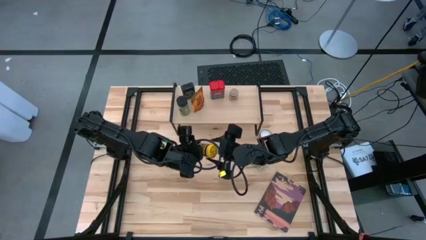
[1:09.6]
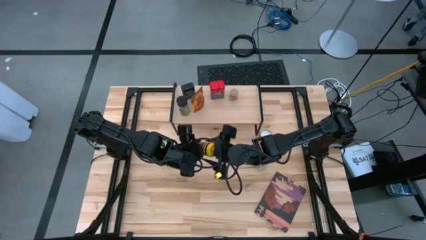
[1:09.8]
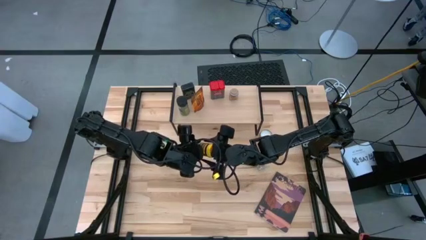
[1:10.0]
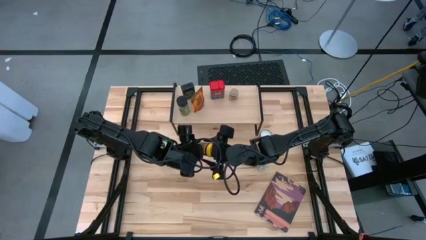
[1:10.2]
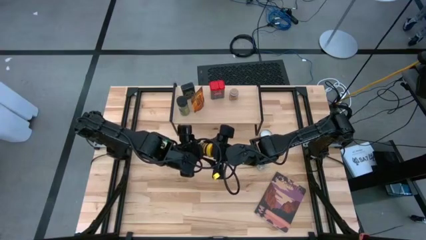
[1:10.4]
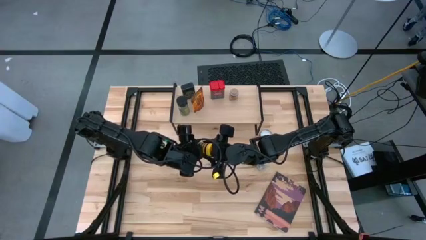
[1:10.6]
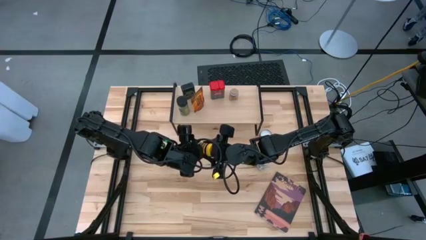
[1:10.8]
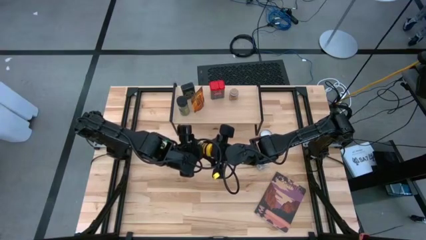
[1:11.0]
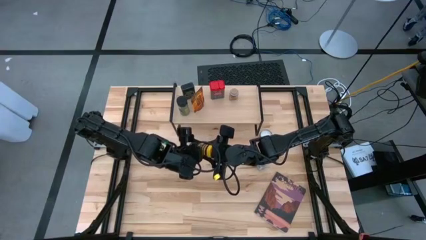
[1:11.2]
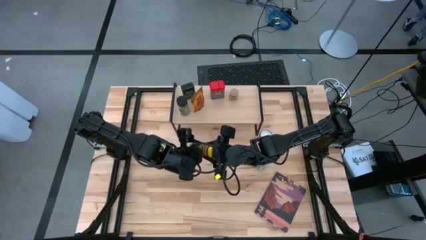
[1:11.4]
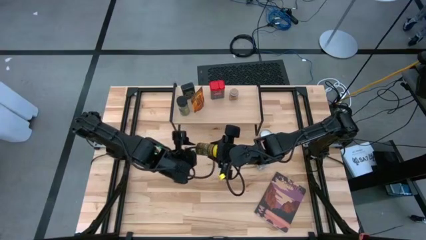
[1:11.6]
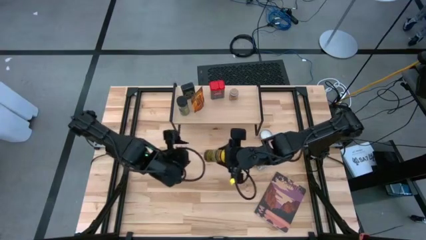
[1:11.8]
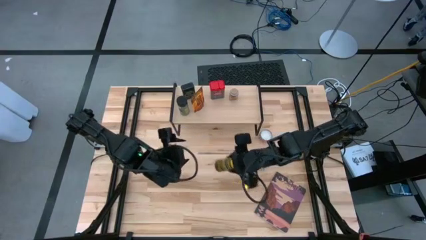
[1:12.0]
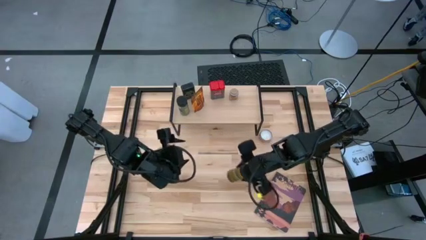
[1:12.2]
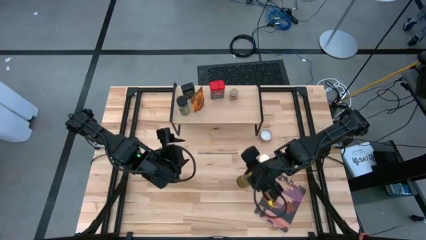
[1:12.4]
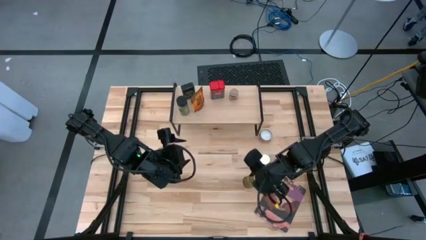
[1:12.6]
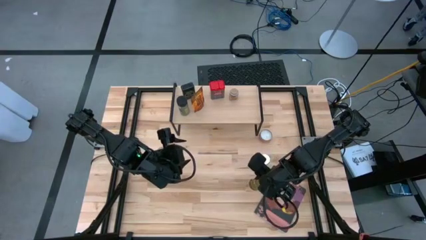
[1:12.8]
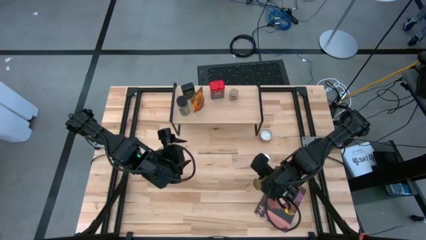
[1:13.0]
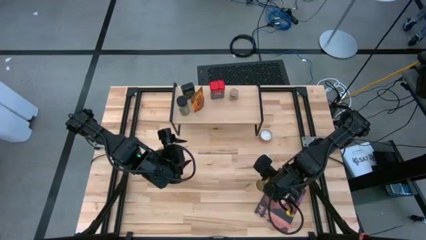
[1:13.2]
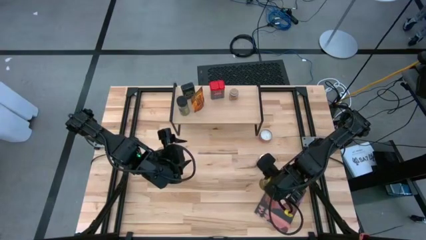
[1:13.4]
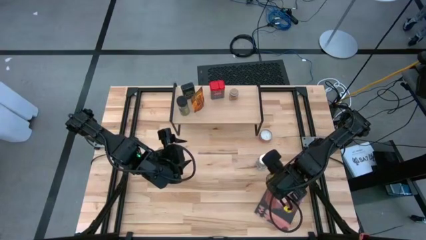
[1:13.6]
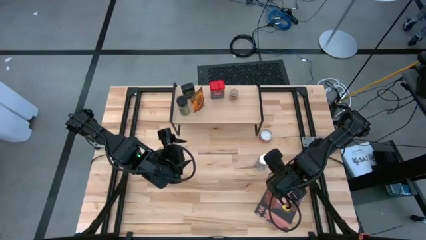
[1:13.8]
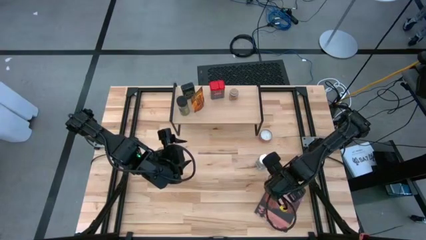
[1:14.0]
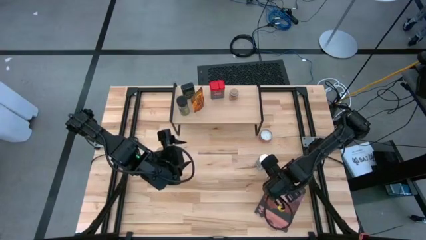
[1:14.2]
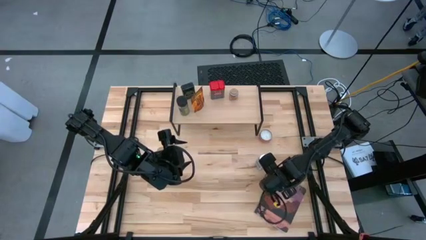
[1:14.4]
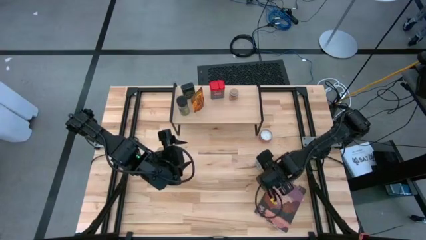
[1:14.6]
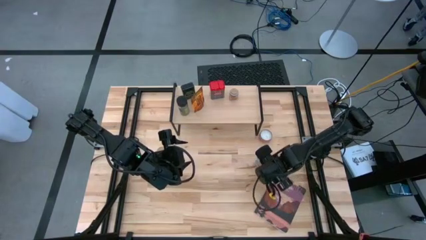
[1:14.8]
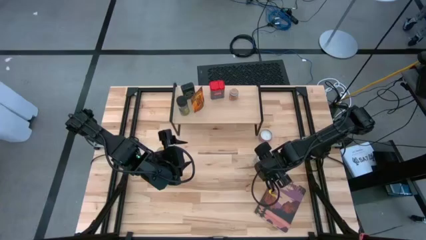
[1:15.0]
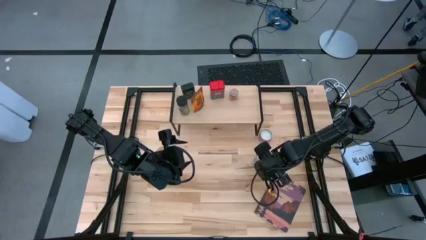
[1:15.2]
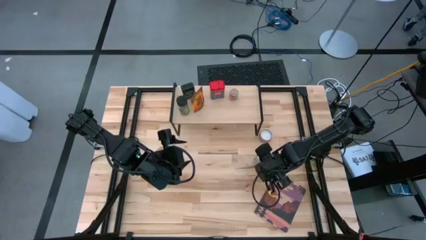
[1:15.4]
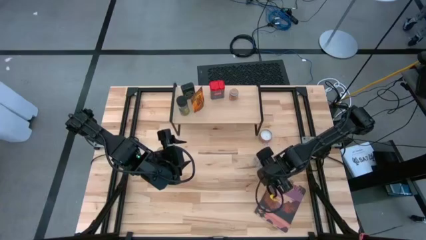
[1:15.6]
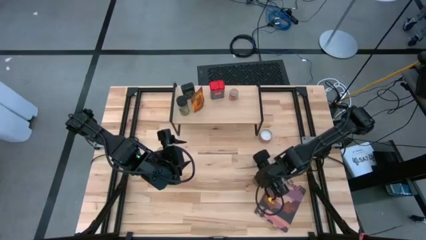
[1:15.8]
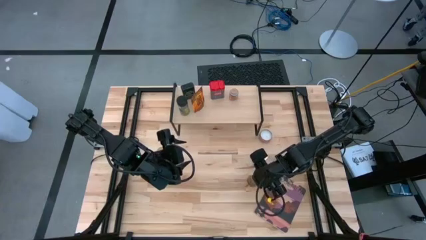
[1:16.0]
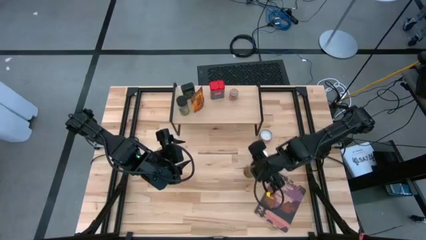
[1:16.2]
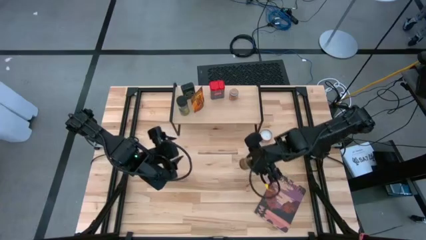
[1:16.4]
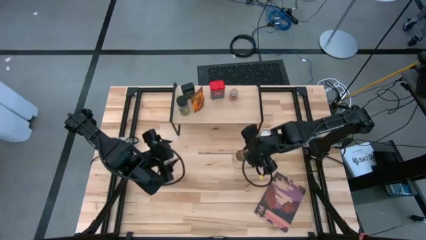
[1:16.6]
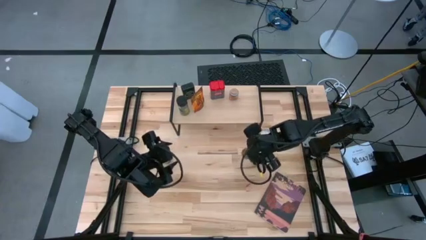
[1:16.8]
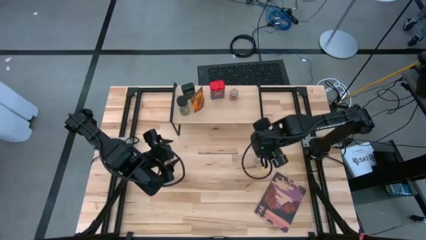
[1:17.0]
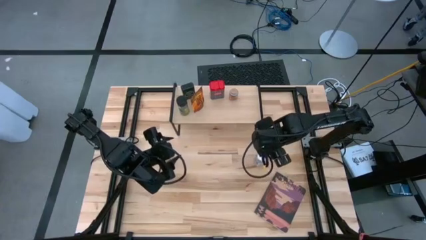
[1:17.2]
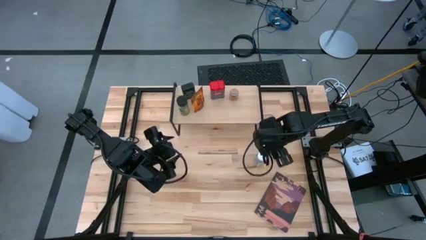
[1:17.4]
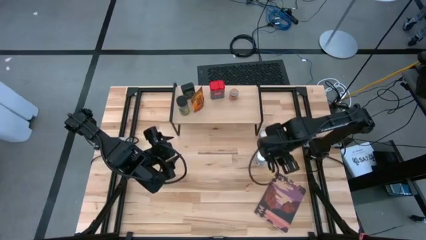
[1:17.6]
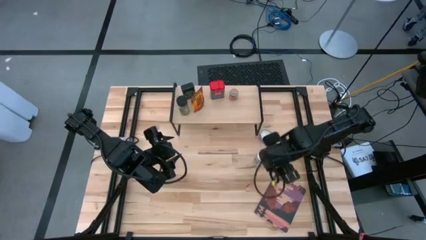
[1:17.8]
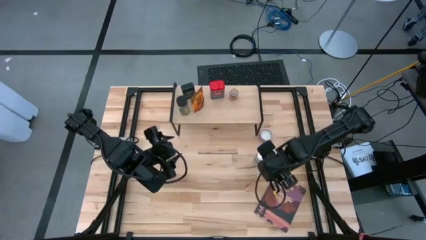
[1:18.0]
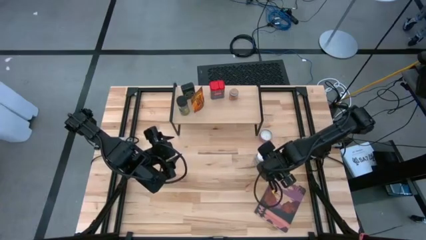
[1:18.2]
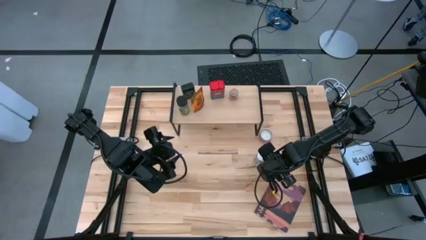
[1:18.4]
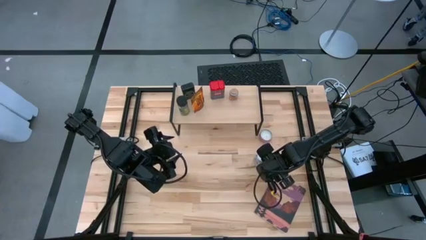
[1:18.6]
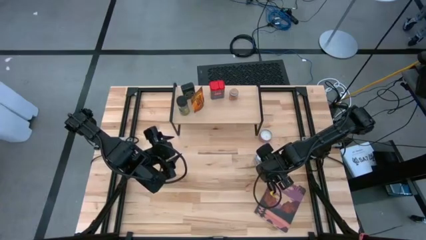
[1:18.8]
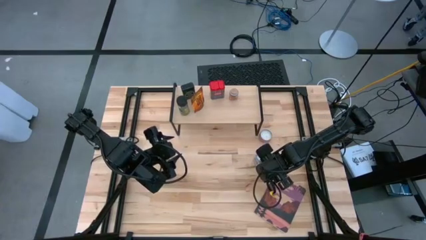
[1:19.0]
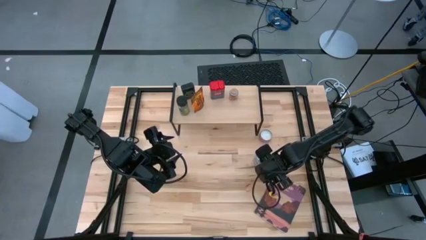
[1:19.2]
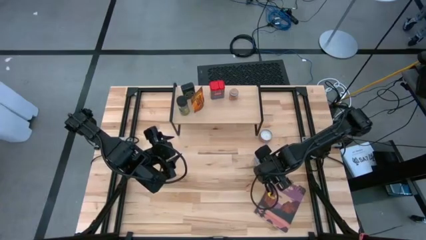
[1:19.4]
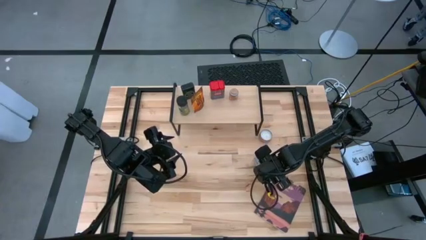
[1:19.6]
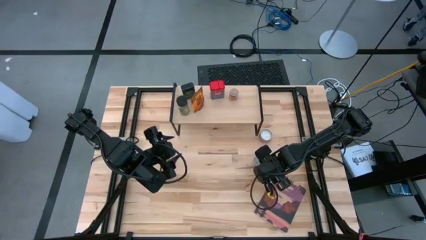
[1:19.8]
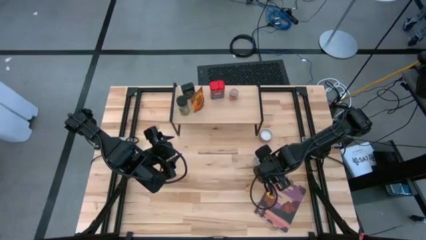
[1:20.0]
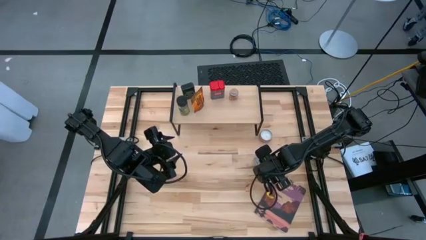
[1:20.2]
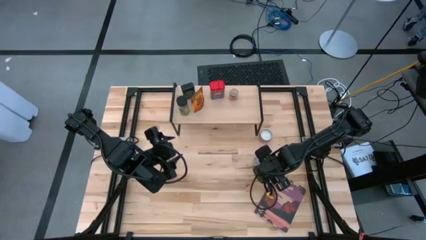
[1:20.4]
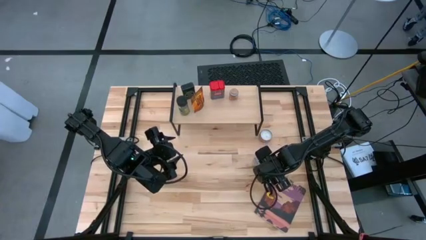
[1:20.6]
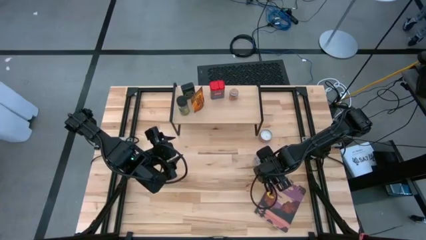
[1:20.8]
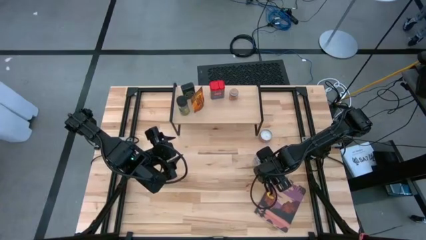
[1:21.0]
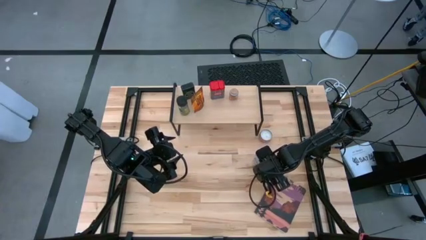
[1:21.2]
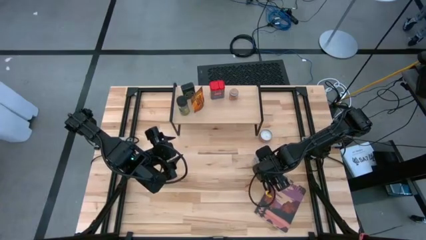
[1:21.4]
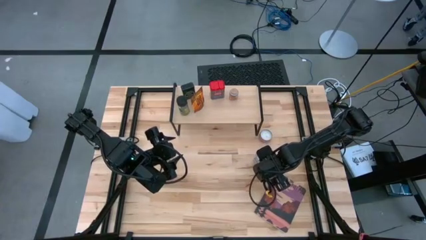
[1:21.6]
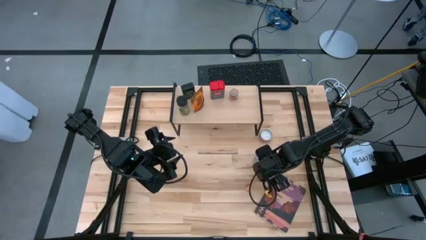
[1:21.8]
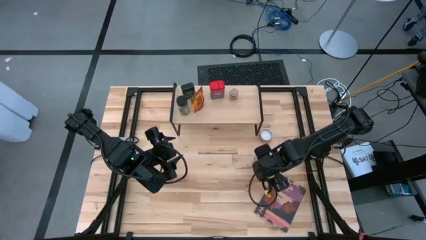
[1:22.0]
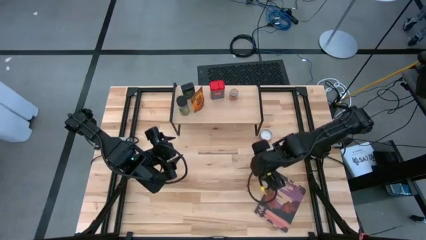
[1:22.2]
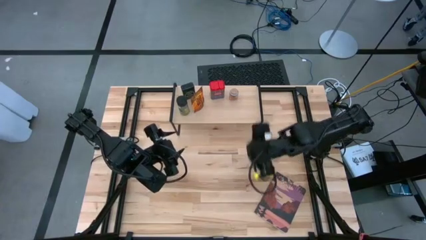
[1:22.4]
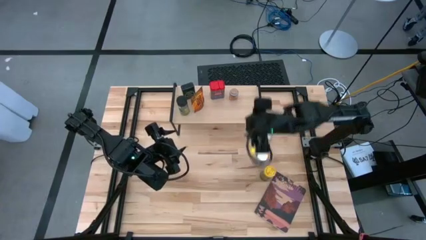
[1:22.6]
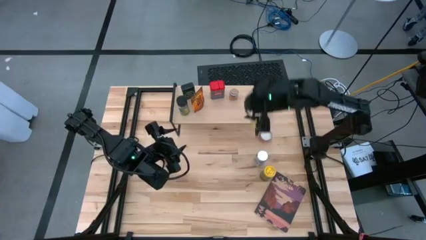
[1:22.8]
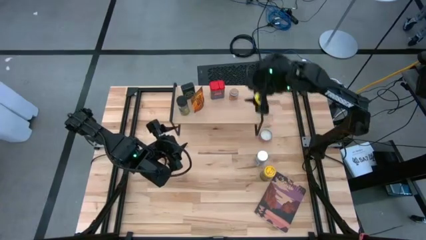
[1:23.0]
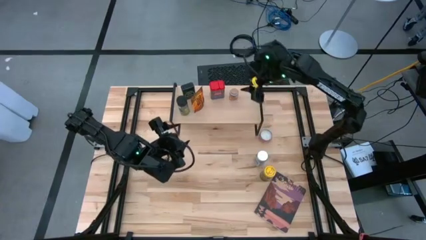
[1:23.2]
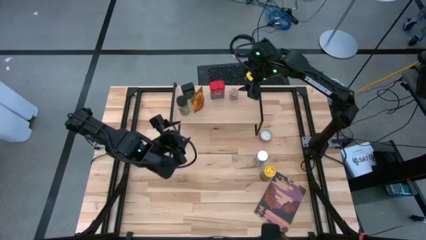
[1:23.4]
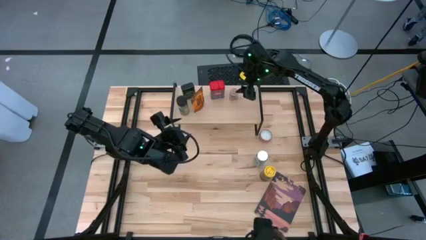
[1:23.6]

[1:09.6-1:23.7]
Task: Shelf spices
Put the yellow spice bottle on the table
